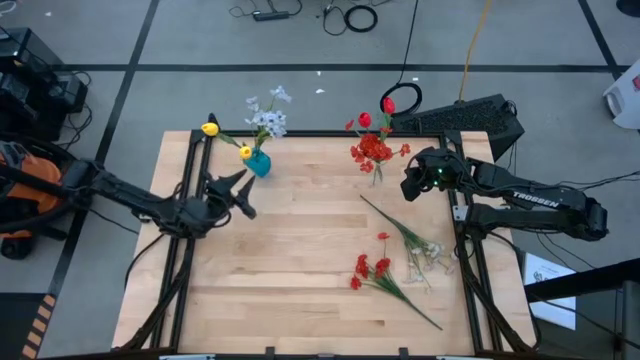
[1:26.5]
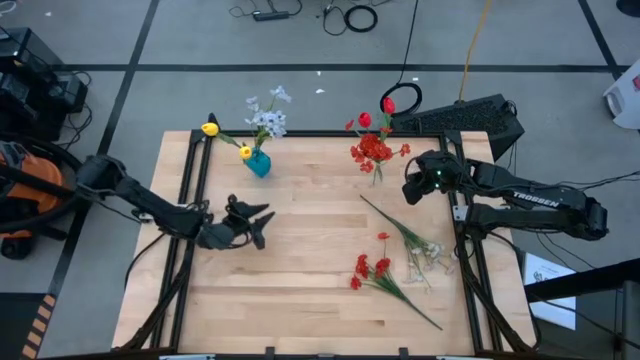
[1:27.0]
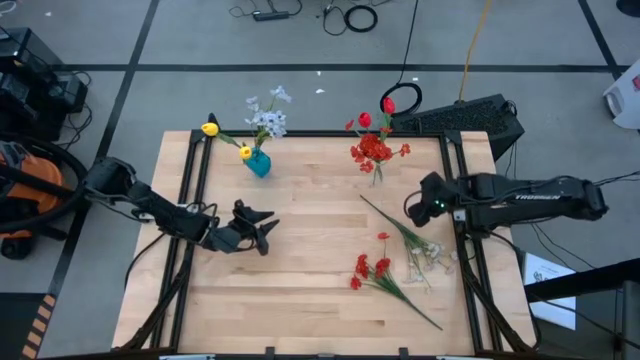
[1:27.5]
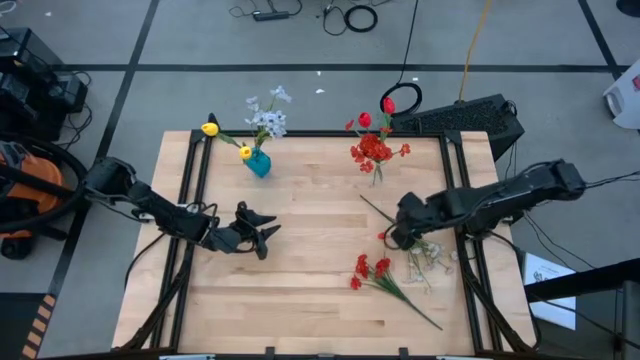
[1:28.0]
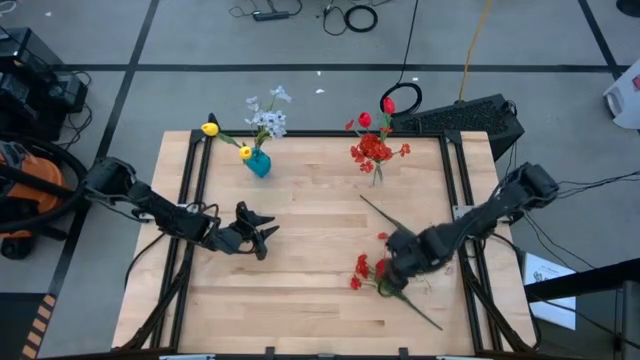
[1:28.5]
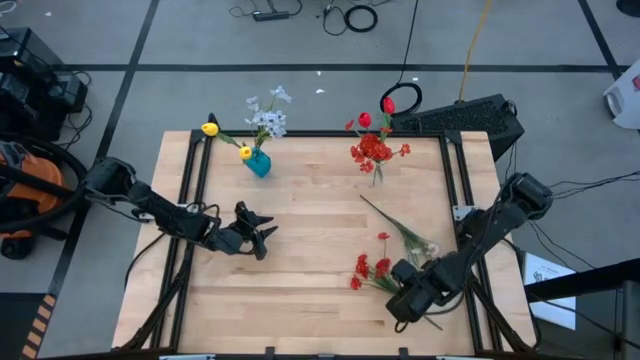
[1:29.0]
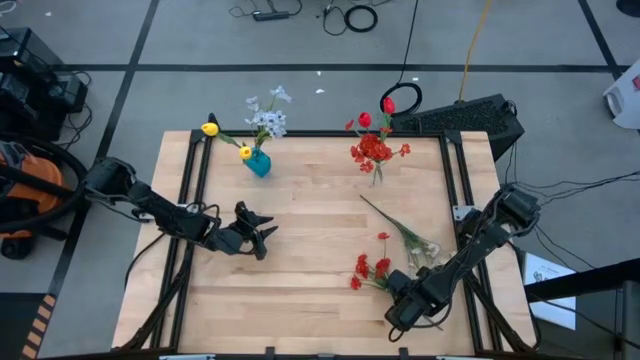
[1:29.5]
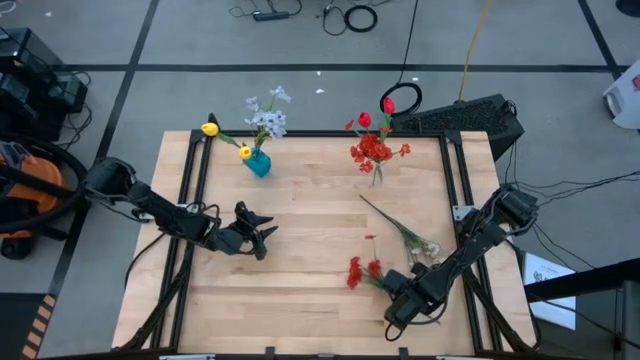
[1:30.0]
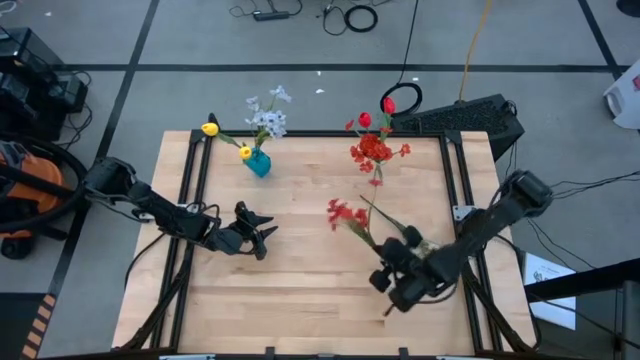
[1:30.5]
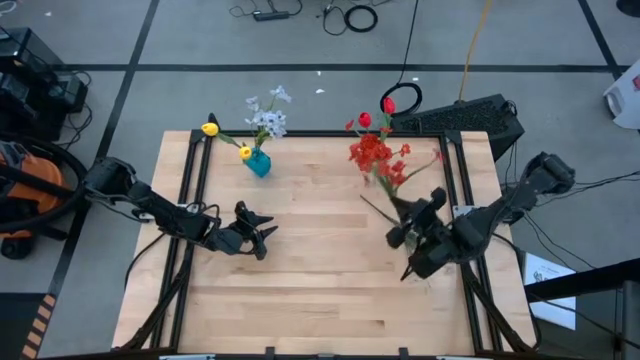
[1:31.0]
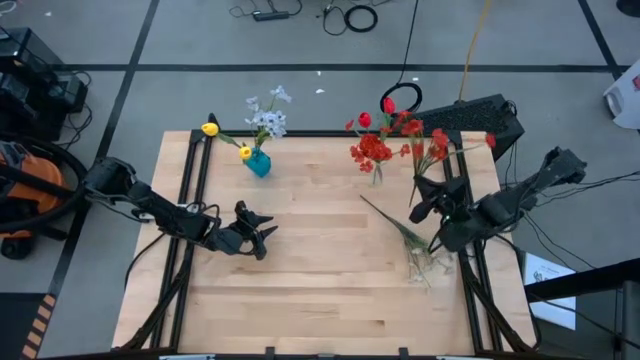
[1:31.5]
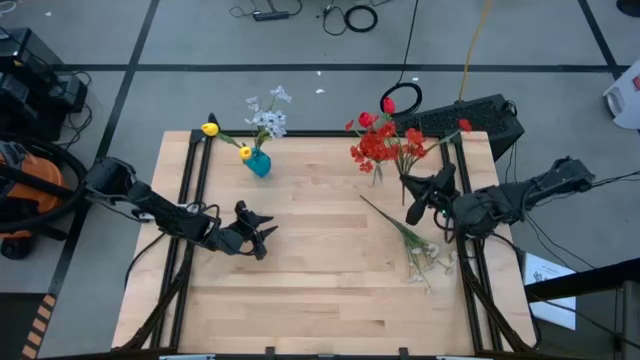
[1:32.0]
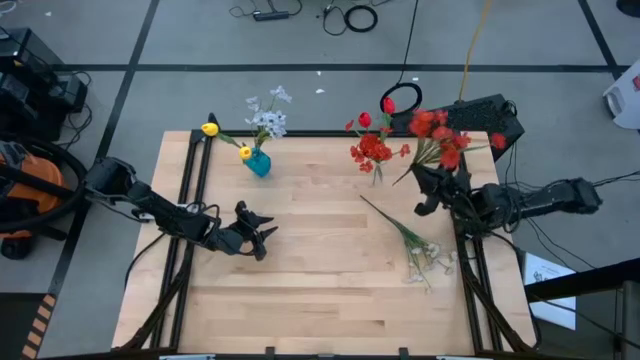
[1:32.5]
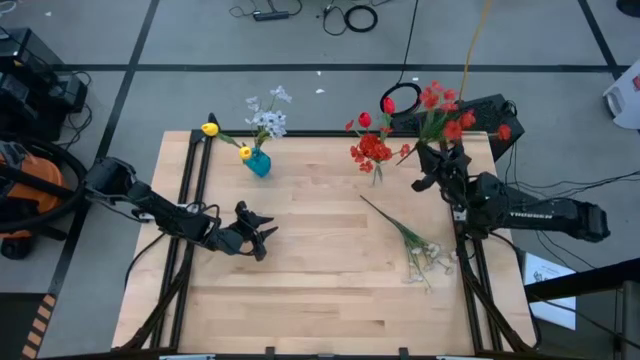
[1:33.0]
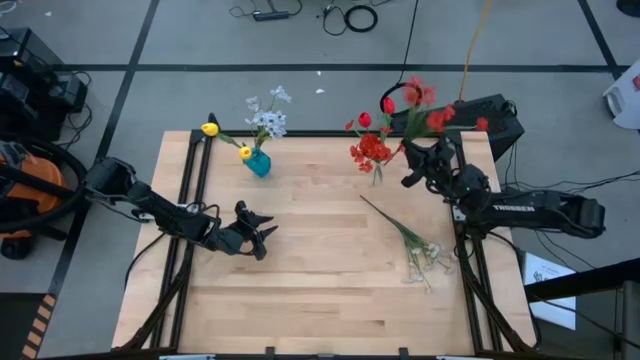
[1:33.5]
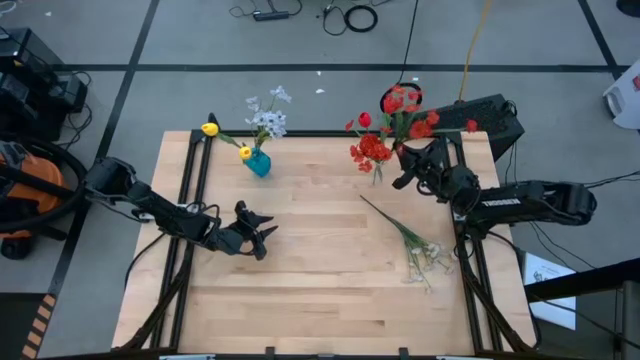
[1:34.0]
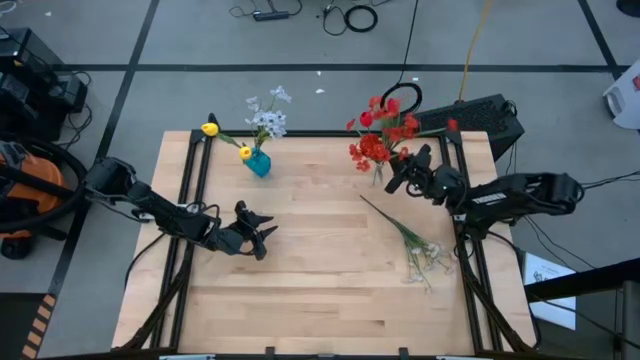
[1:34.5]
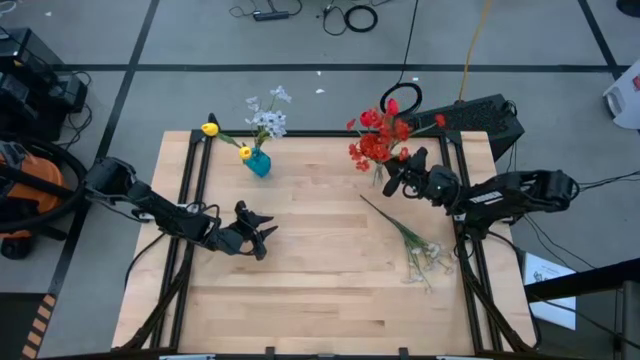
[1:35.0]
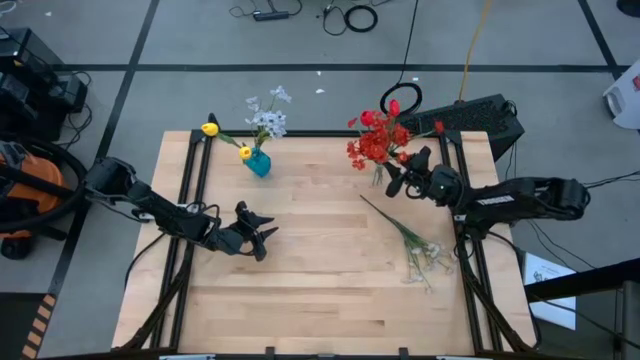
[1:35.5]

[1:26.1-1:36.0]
Task: Sort flowers into vase by color
Put the red flowers into the transparent vase

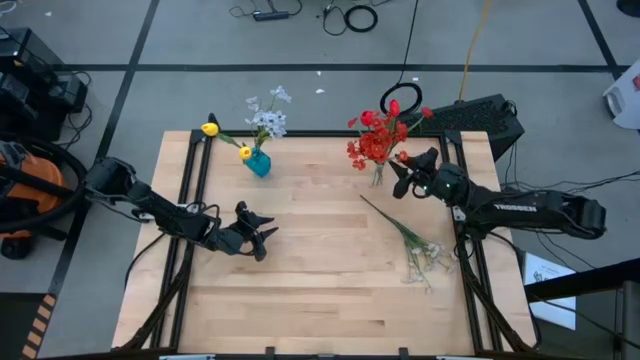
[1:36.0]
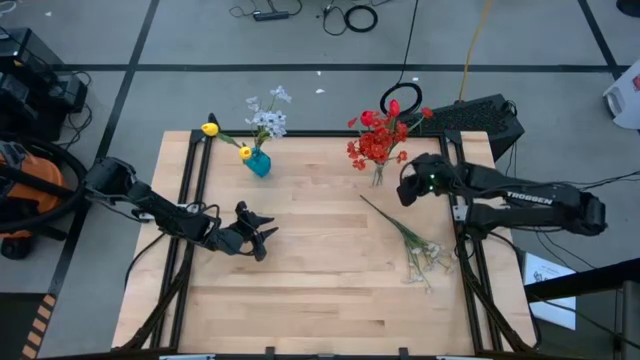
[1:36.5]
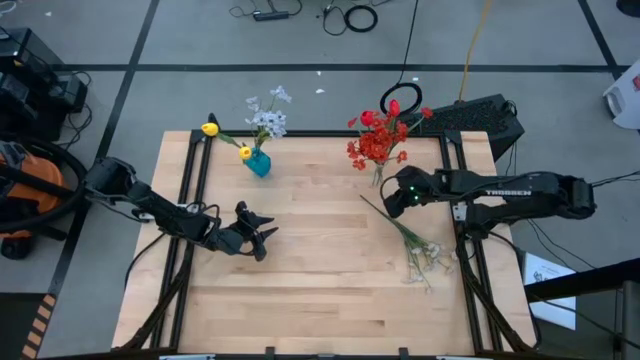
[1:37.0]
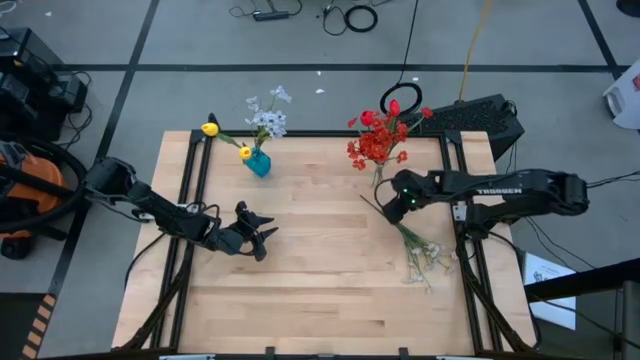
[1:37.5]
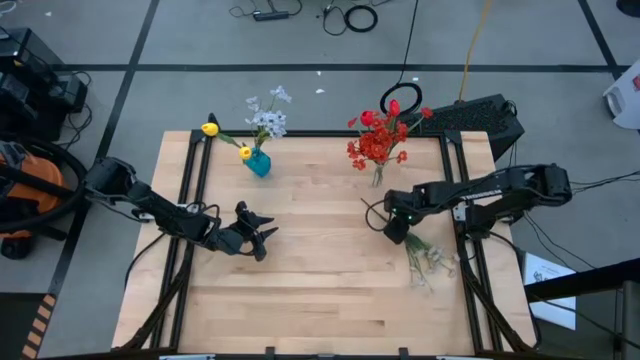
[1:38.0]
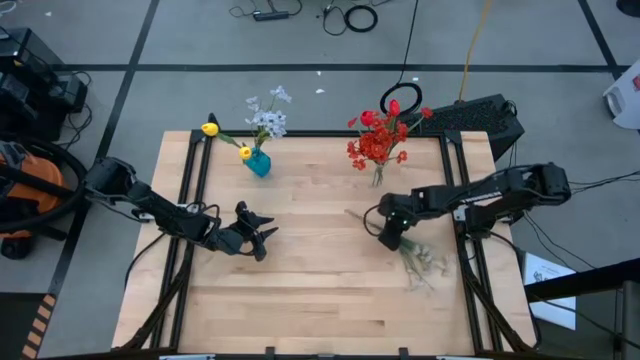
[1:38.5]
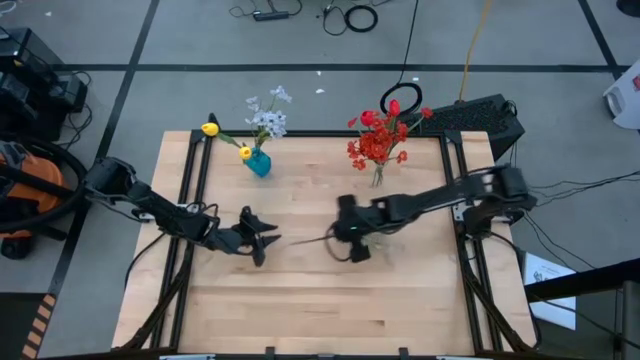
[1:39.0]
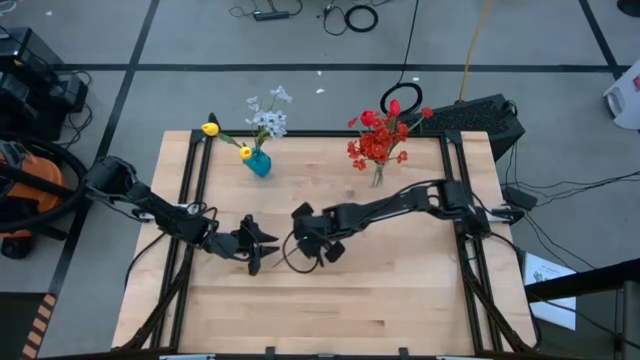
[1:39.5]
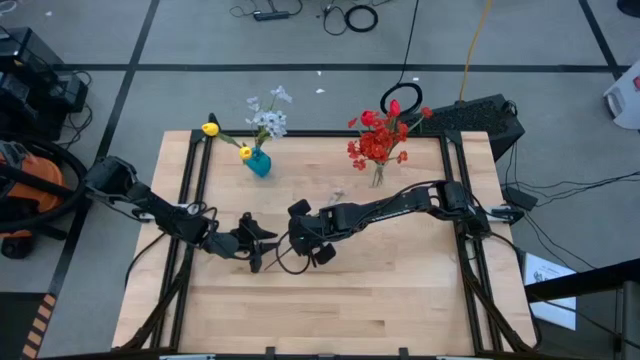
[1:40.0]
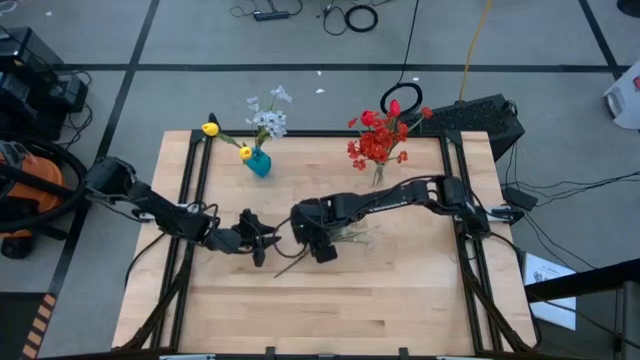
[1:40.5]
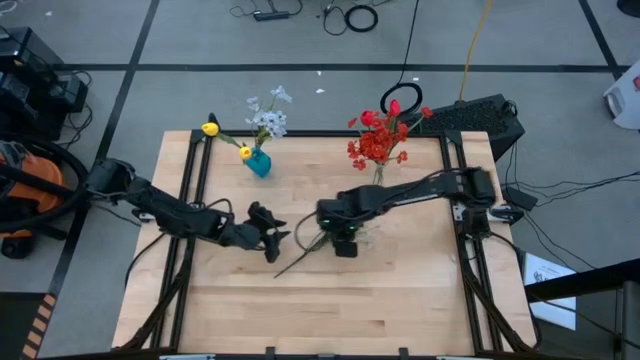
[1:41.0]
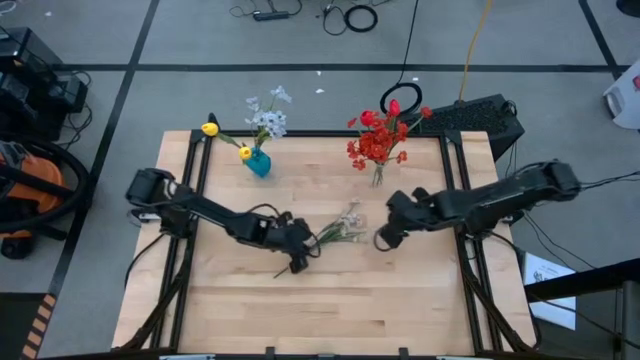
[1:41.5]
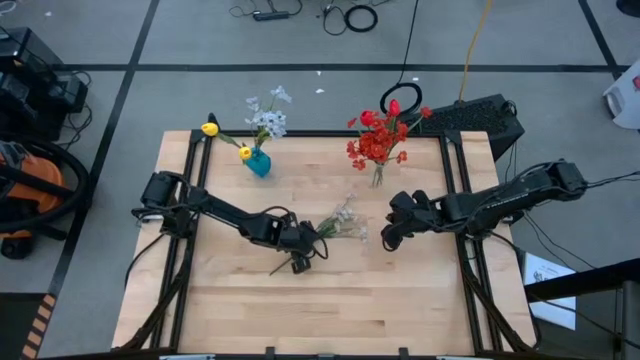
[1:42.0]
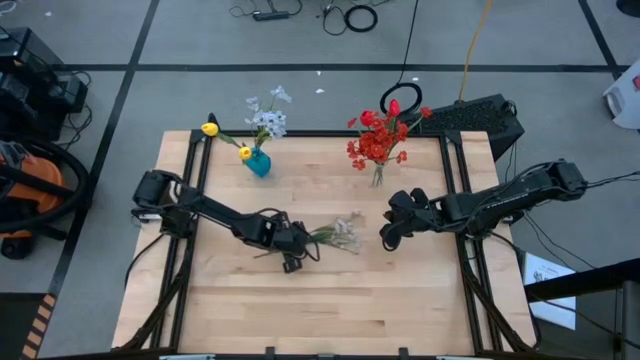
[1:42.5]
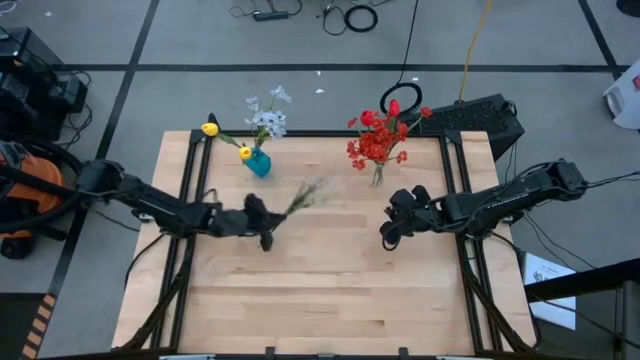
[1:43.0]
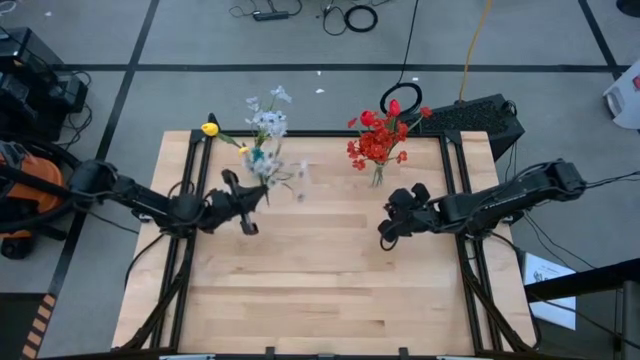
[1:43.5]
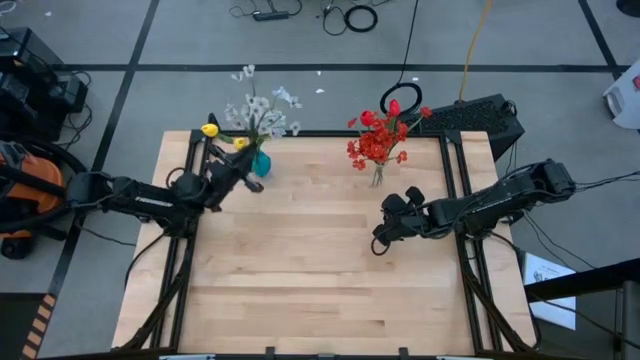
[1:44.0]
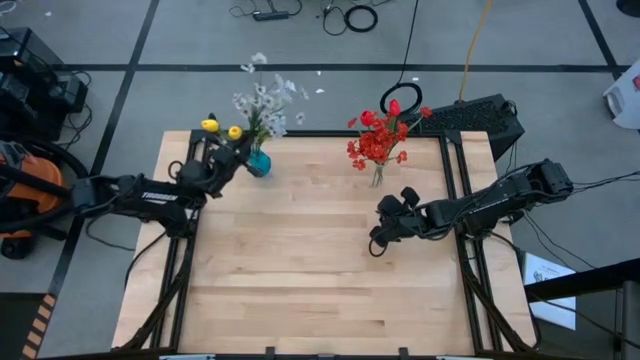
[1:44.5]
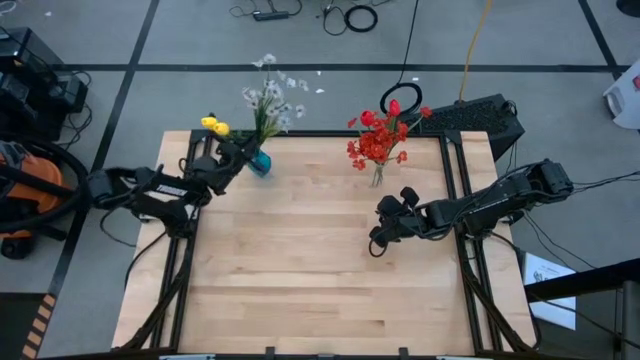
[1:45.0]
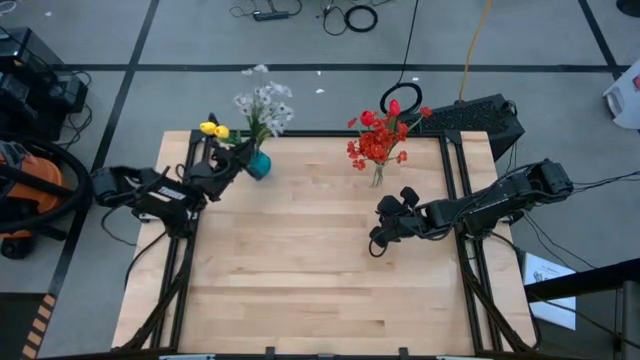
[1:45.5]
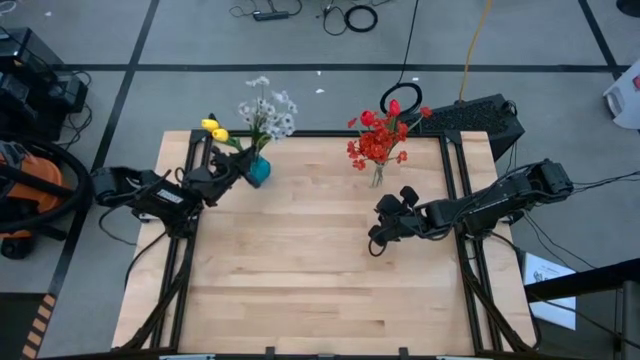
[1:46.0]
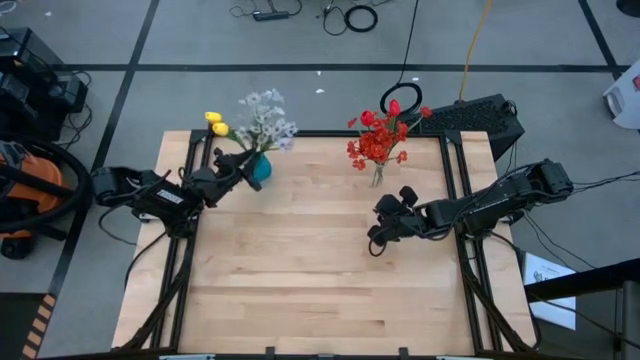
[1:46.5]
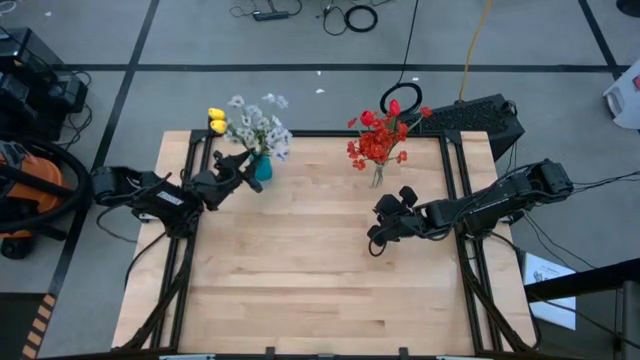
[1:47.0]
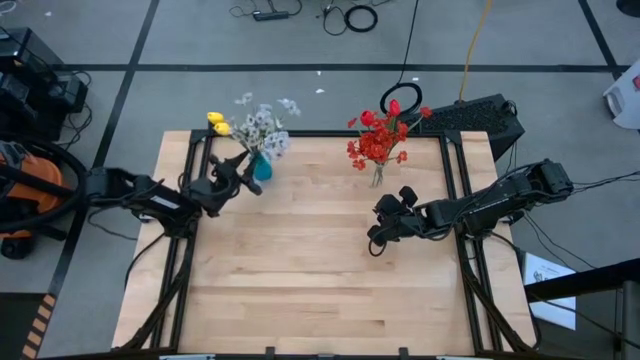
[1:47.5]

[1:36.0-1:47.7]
Put the white flowers into the blue vase
